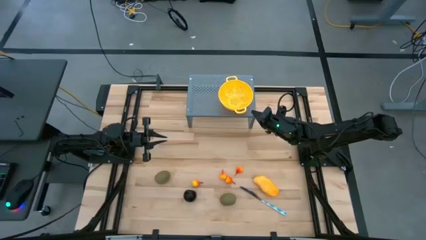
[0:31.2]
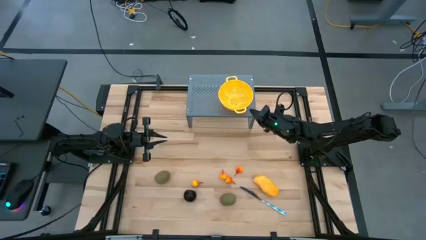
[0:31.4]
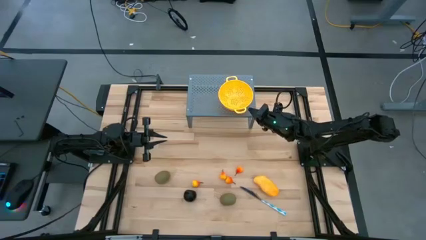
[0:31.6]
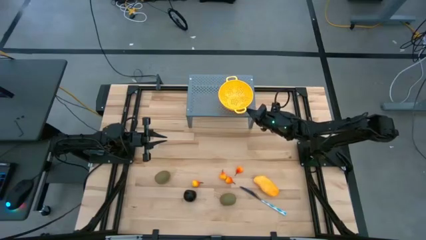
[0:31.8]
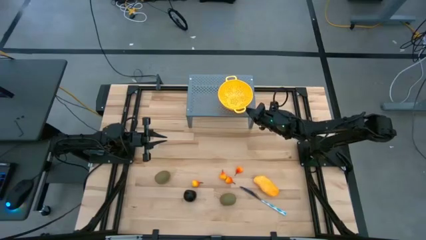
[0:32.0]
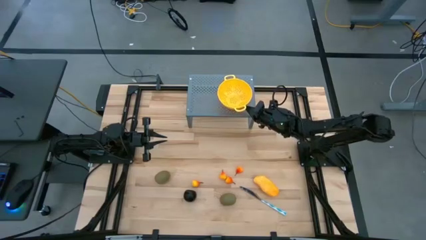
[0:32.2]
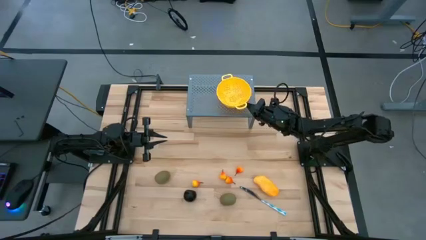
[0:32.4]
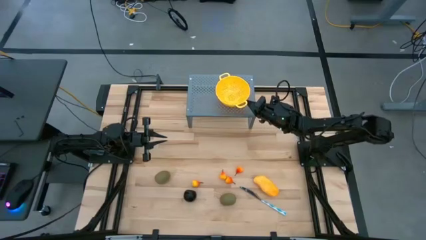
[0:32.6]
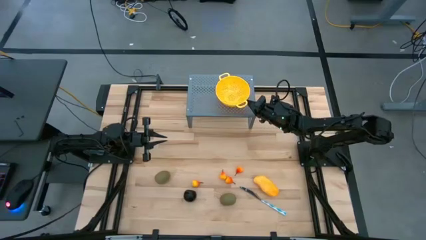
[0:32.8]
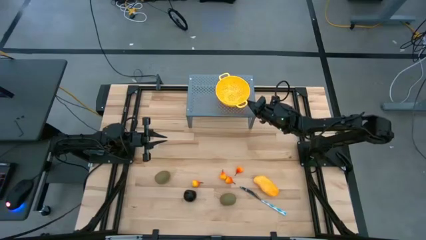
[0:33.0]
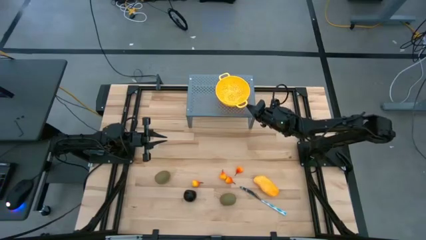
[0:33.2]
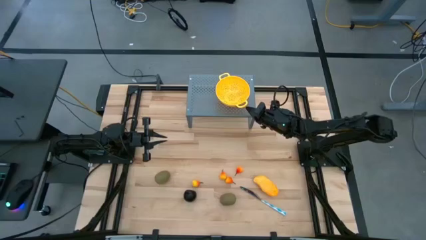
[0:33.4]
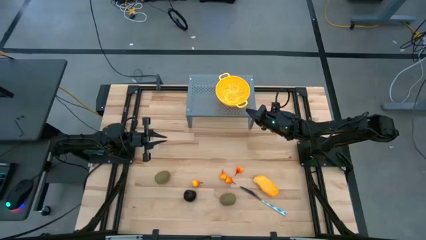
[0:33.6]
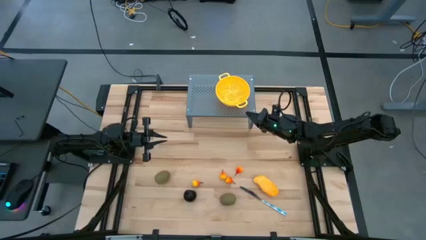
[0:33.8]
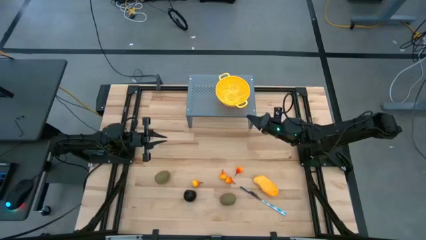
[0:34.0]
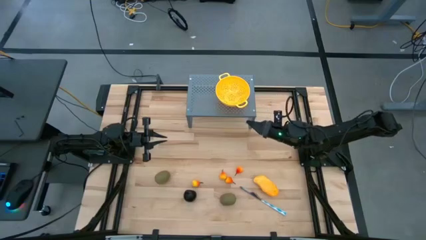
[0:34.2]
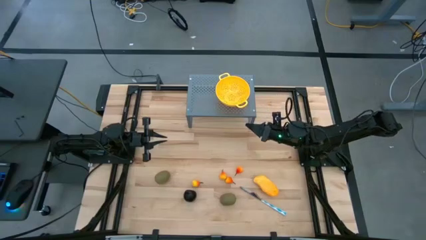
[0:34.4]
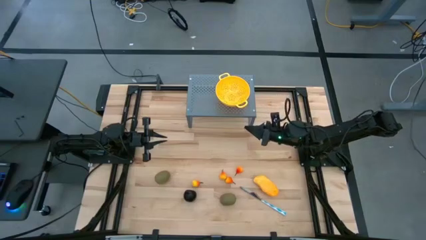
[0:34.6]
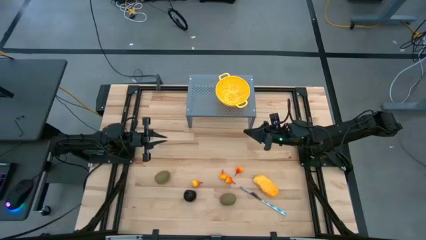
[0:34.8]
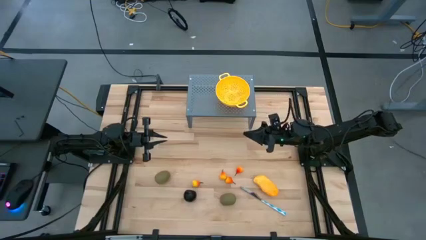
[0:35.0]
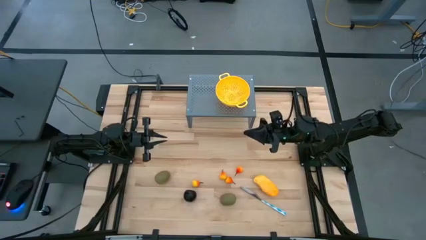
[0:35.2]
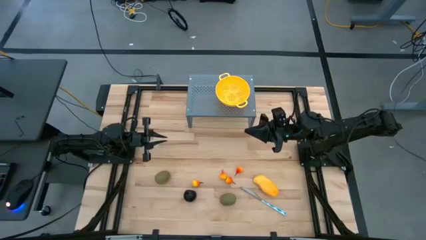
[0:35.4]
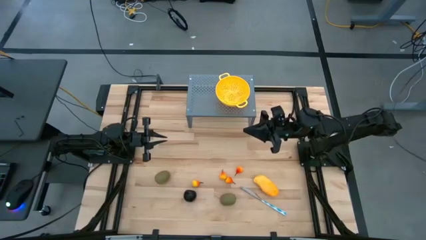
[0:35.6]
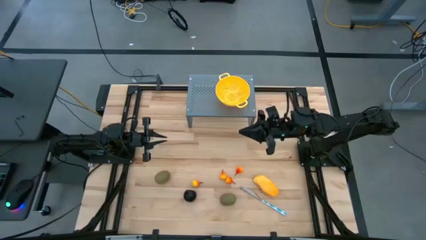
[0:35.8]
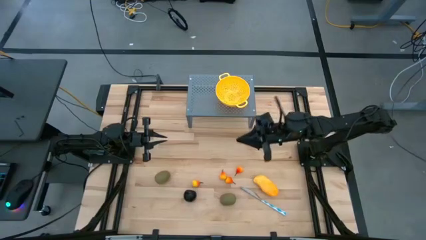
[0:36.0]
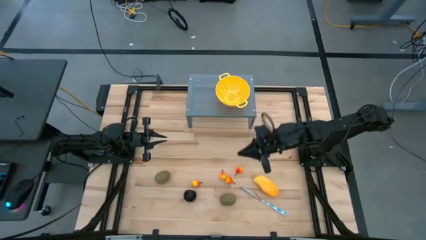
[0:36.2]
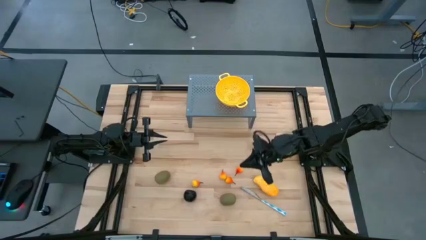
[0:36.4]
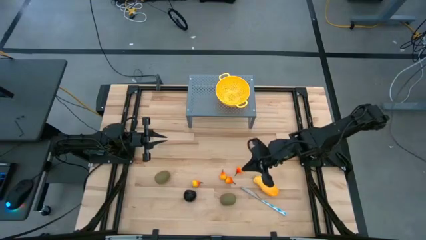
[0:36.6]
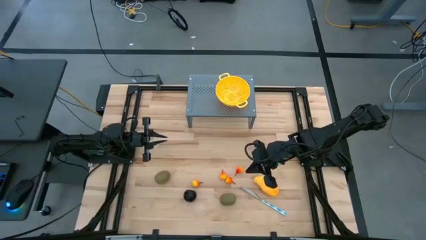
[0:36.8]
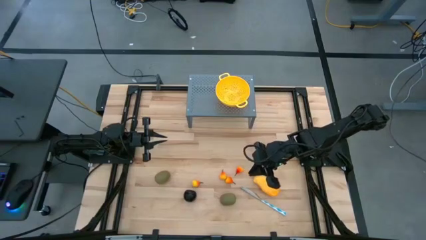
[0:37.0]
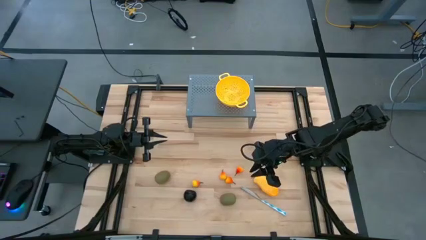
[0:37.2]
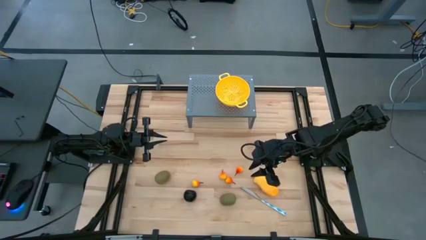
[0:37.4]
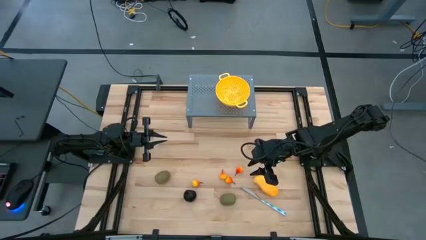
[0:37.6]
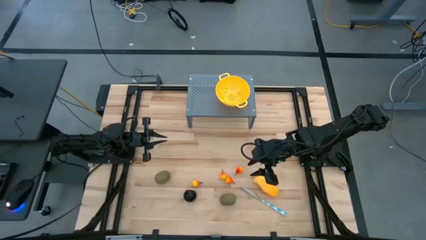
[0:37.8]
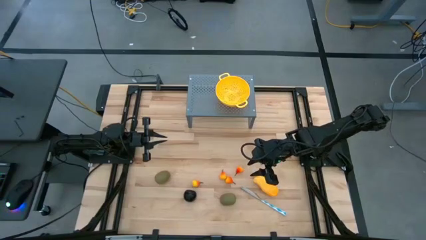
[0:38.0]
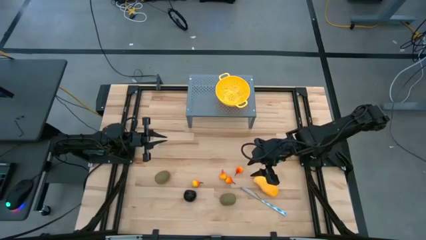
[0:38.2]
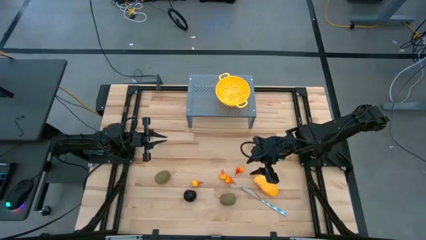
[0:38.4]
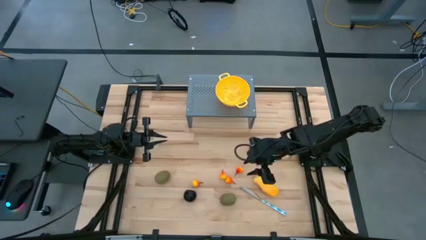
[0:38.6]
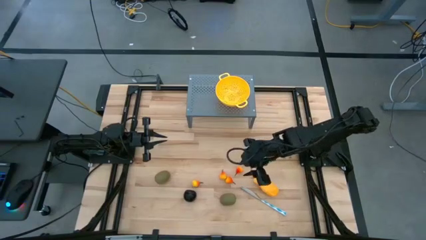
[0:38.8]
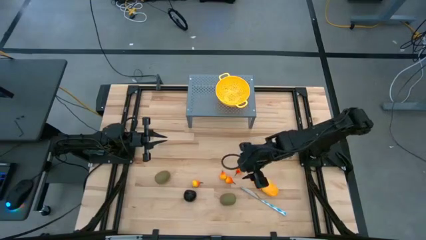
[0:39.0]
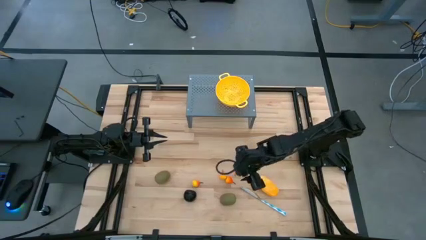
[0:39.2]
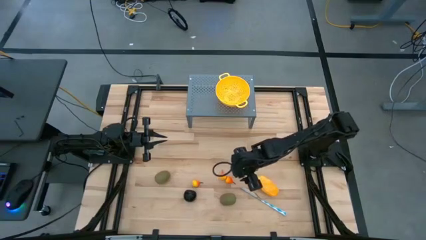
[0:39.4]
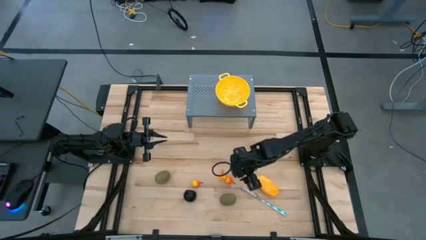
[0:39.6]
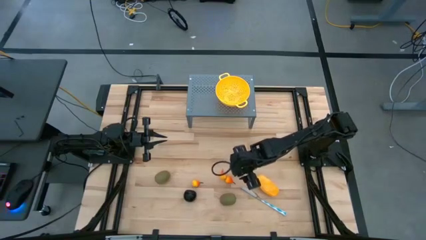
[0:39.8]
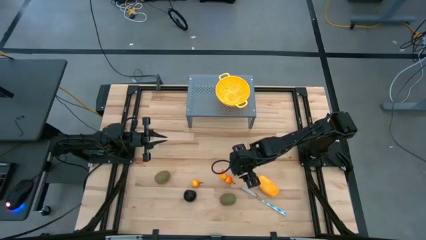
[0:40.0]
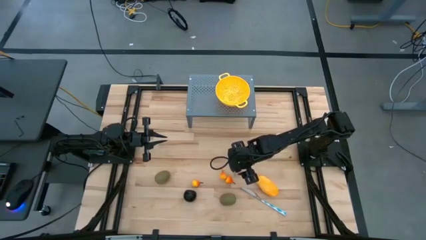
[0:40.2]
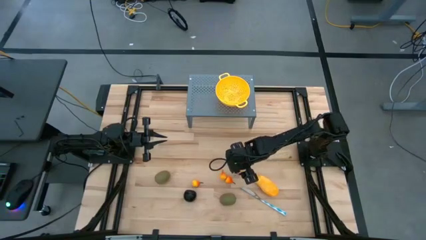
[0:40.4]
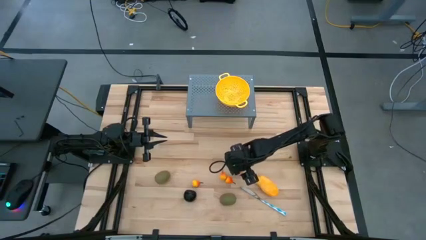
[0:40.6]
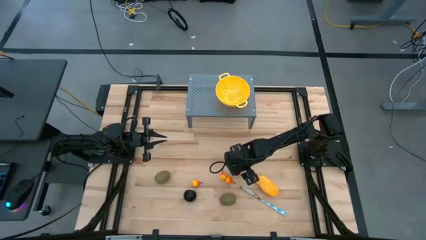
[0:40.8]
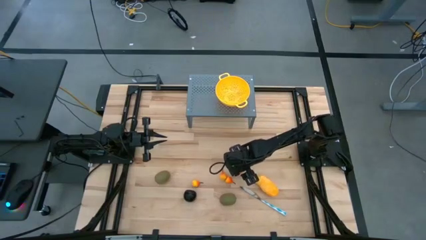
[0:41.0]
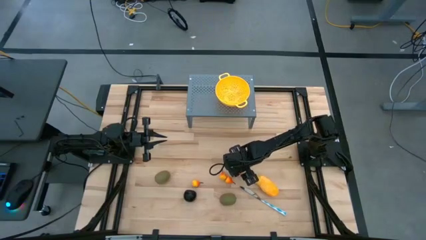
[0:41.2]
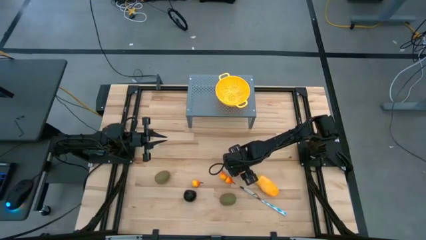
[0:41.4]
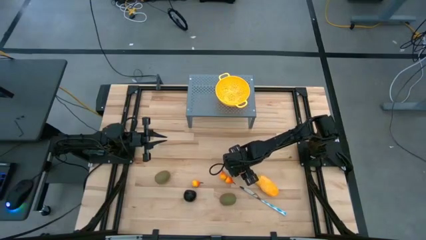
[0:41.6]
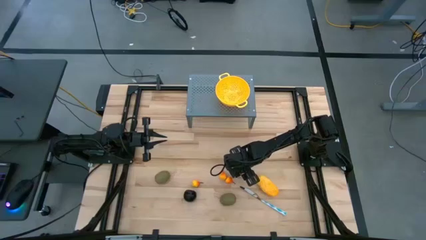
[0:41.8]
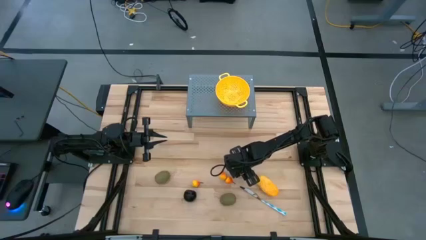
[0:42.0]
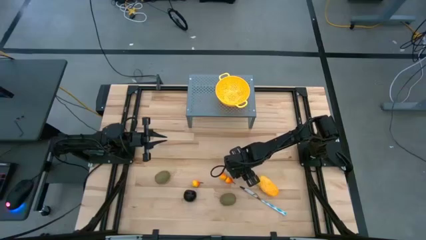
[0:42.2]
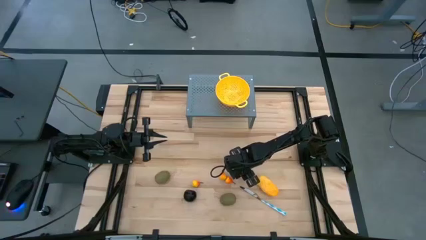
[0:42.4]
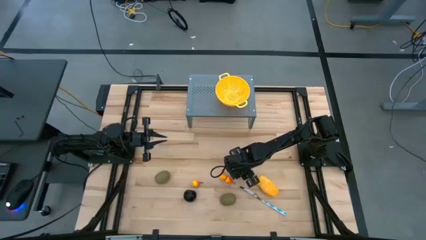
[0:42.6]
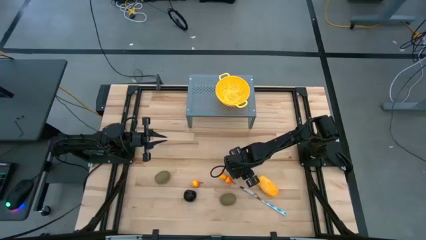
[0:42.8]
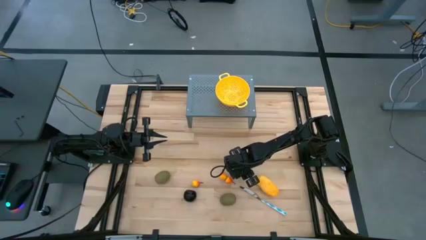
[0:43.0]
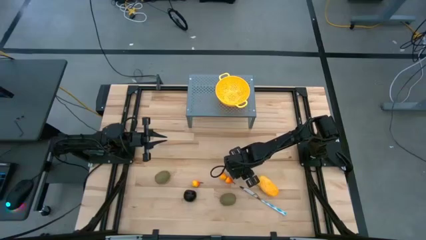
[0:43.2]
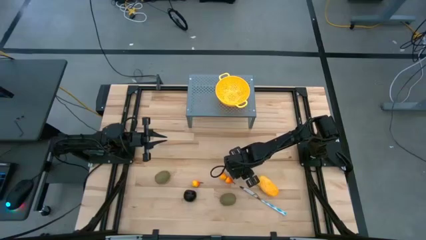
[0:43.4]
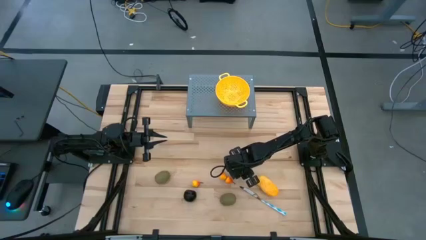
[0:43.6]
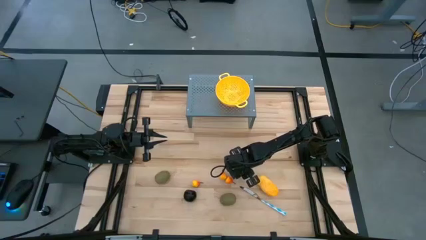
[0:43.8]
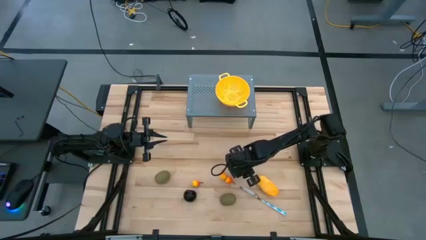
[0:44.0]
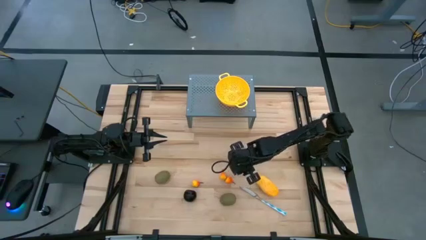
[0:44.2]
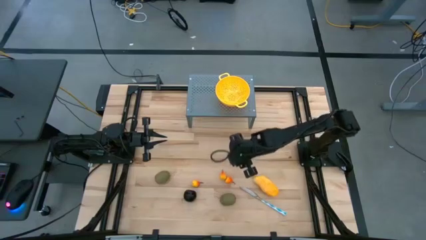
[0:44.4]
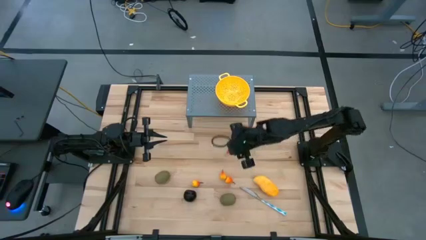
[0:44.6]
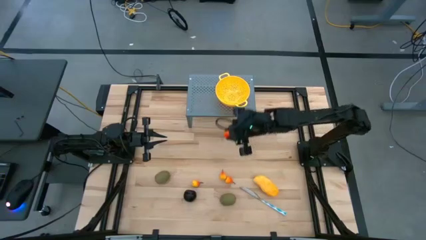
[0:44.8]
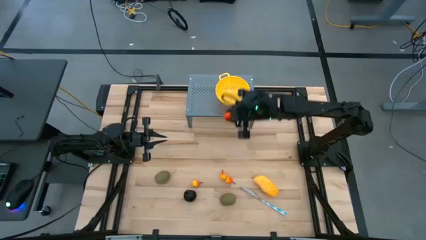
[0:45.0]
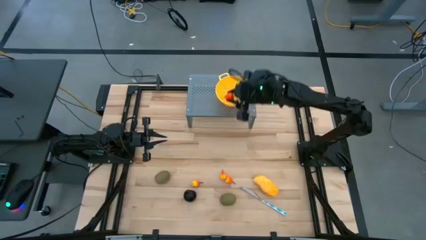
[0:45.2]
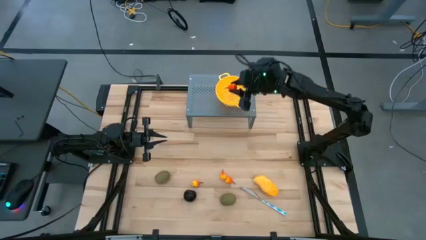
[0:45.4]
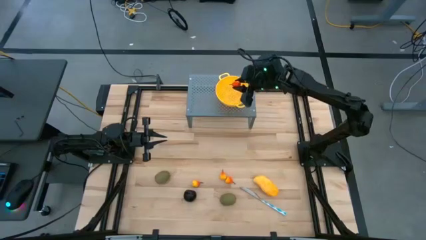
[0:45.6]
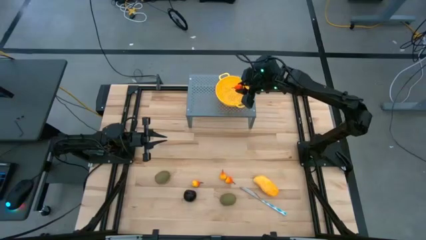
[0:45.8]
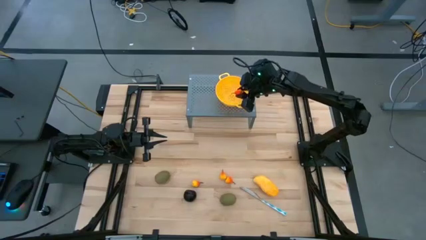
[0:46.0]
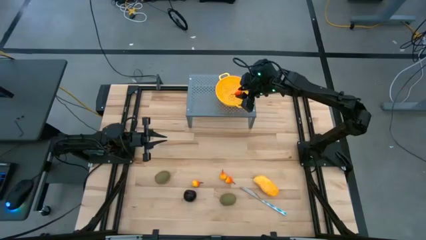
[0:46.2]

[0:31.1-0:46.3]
Task: Pick & Place Fruit
Put the peach into the yellow strainer bowl on the shelf
